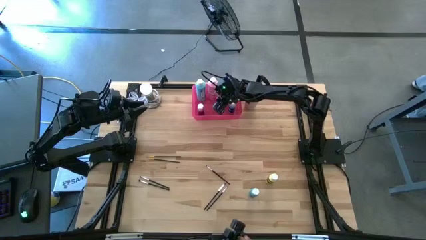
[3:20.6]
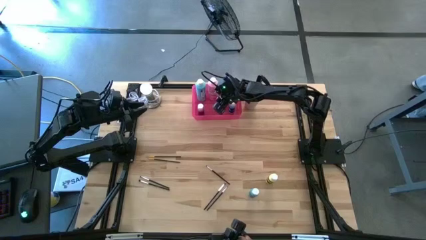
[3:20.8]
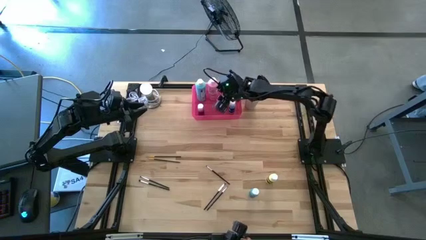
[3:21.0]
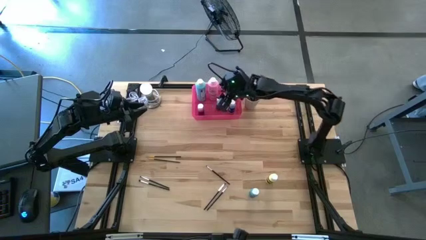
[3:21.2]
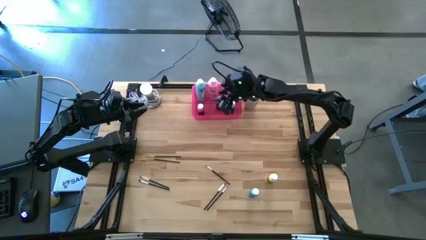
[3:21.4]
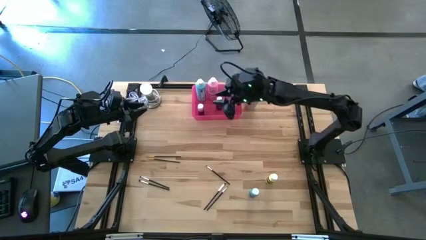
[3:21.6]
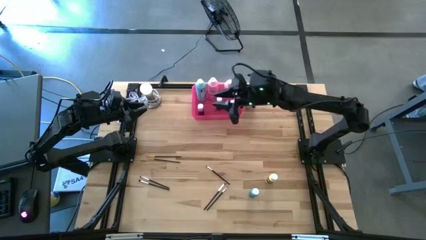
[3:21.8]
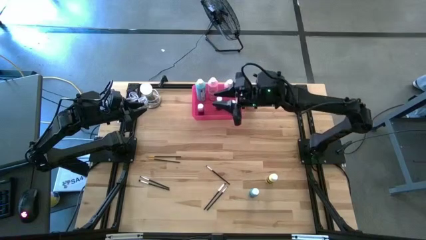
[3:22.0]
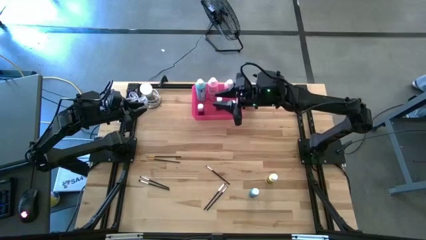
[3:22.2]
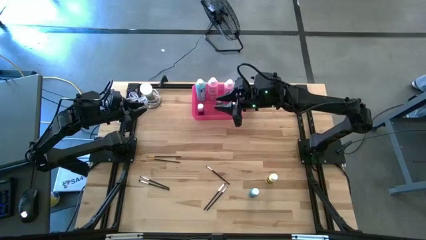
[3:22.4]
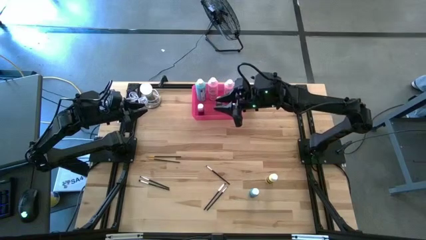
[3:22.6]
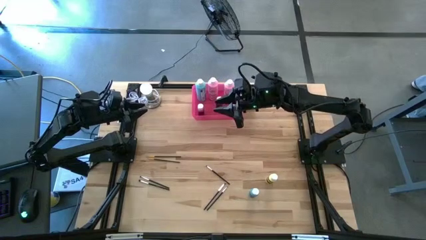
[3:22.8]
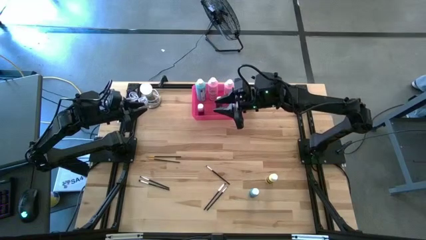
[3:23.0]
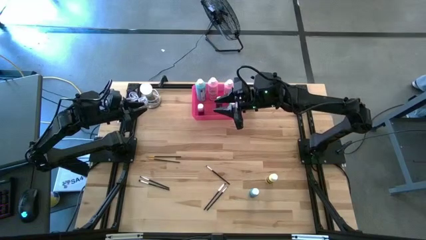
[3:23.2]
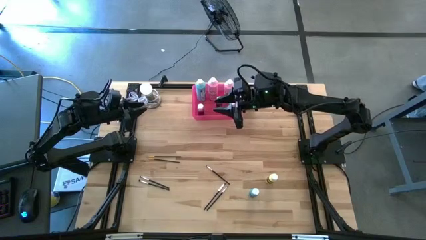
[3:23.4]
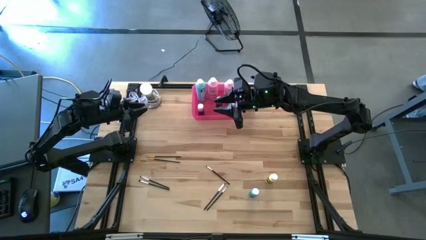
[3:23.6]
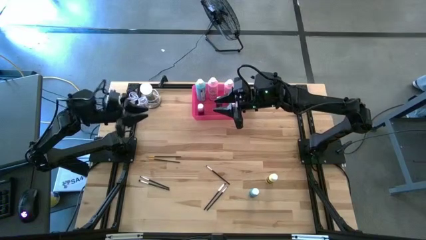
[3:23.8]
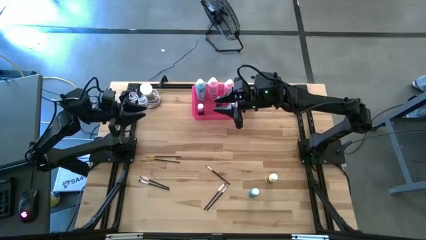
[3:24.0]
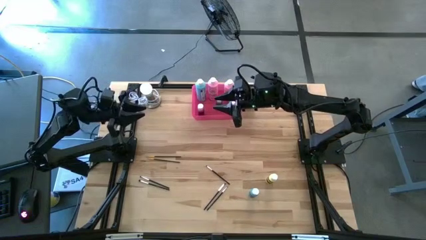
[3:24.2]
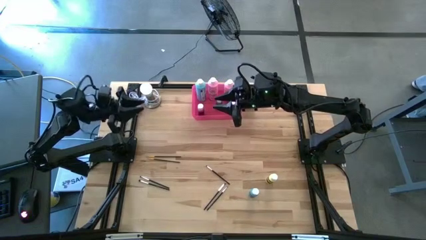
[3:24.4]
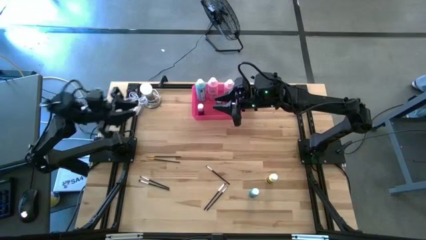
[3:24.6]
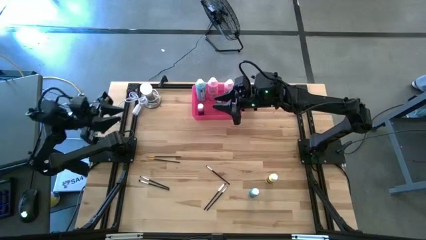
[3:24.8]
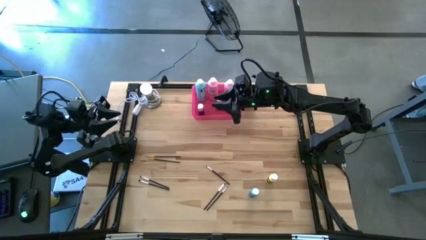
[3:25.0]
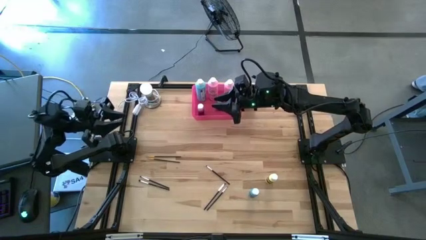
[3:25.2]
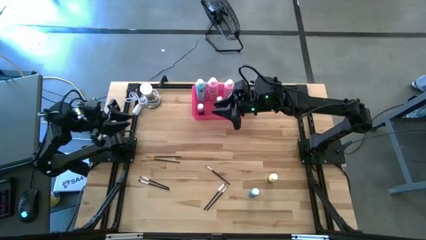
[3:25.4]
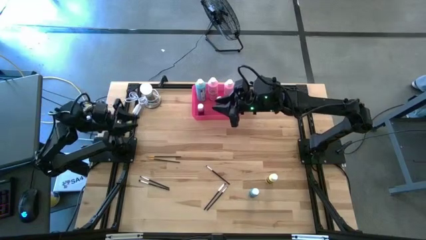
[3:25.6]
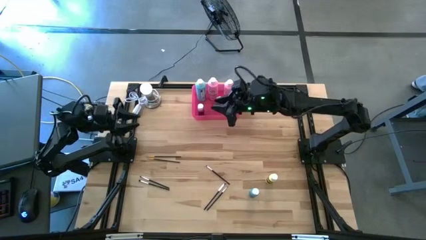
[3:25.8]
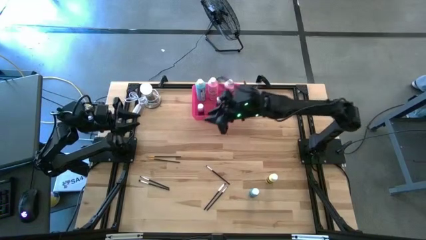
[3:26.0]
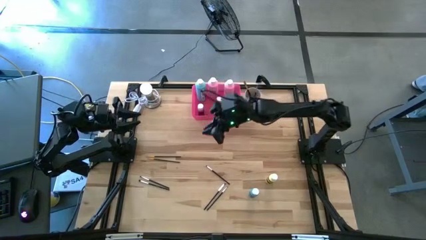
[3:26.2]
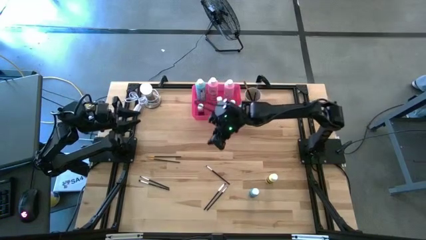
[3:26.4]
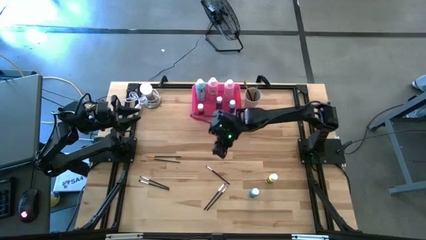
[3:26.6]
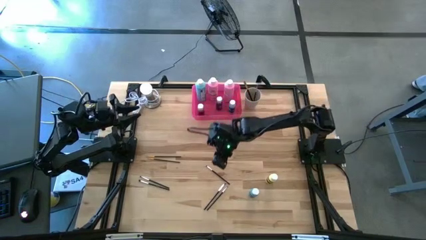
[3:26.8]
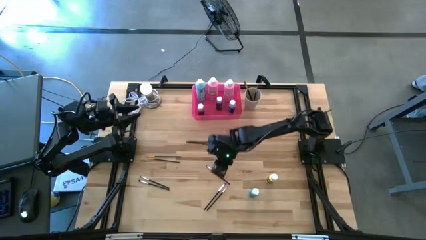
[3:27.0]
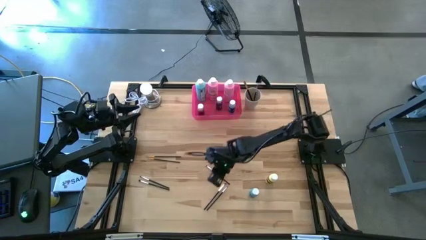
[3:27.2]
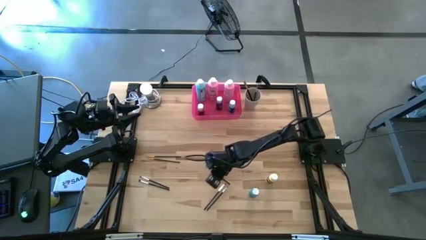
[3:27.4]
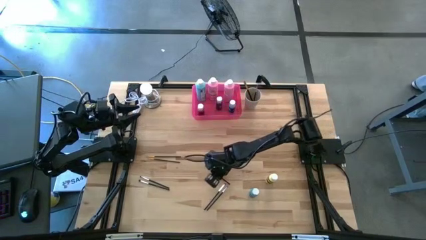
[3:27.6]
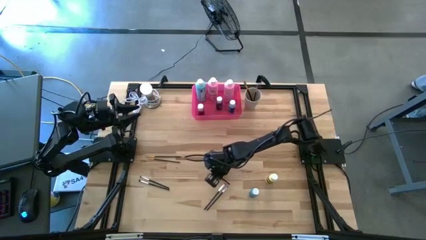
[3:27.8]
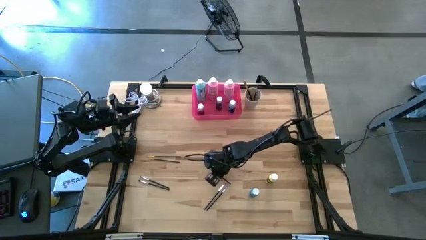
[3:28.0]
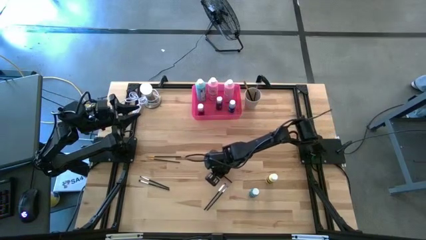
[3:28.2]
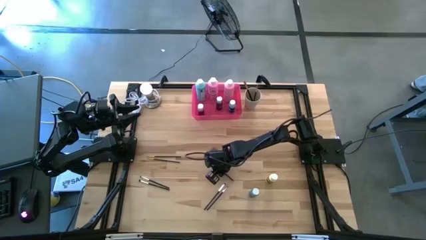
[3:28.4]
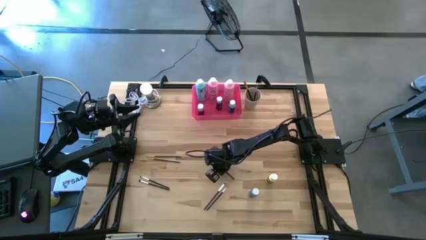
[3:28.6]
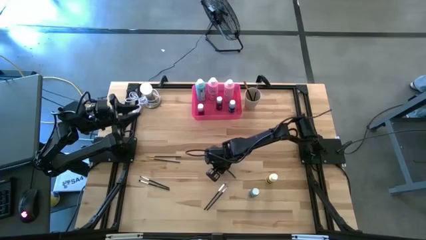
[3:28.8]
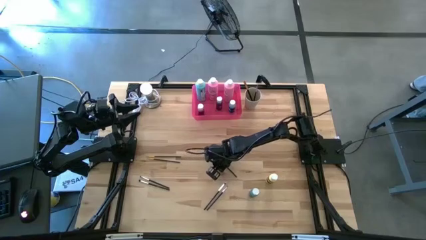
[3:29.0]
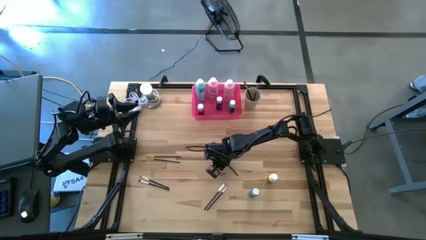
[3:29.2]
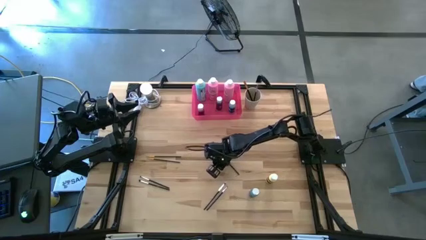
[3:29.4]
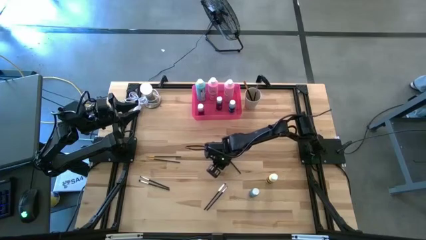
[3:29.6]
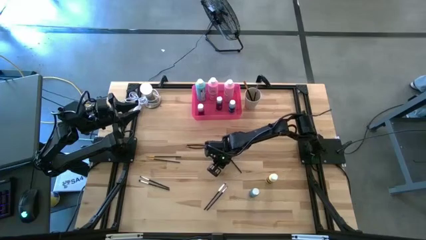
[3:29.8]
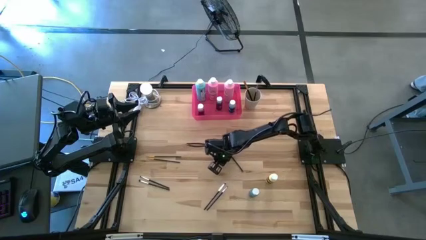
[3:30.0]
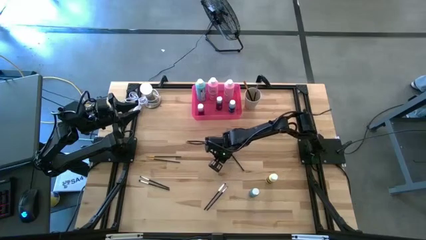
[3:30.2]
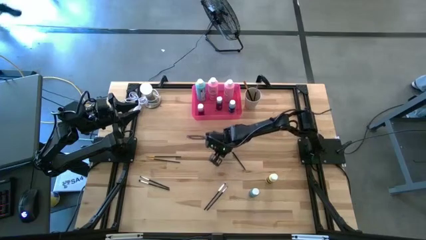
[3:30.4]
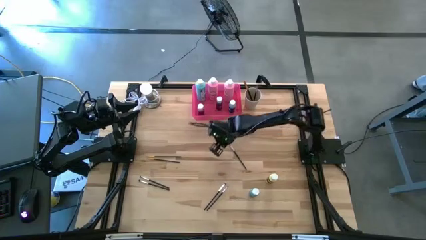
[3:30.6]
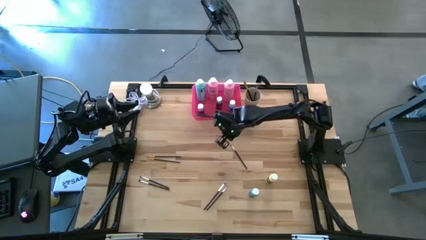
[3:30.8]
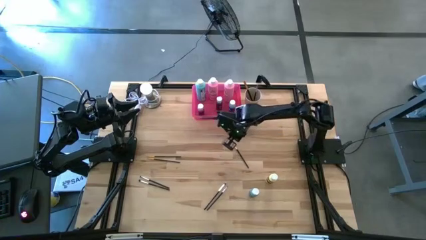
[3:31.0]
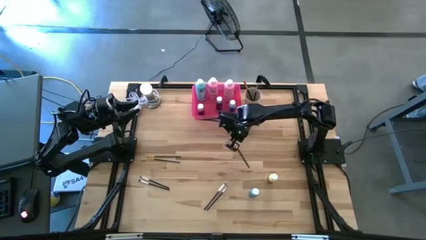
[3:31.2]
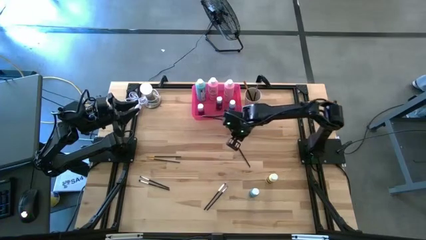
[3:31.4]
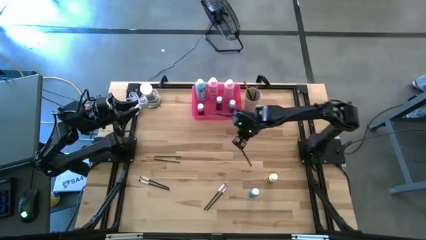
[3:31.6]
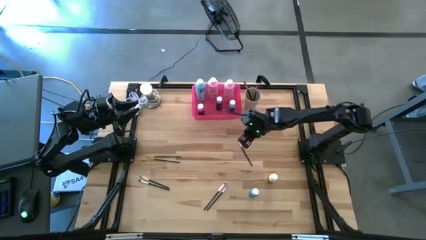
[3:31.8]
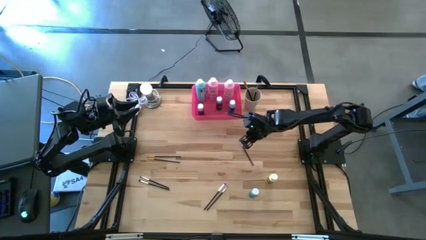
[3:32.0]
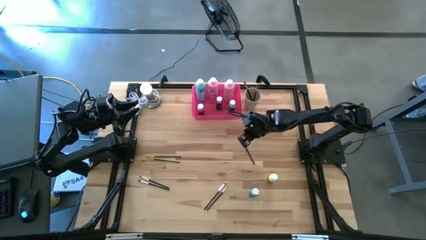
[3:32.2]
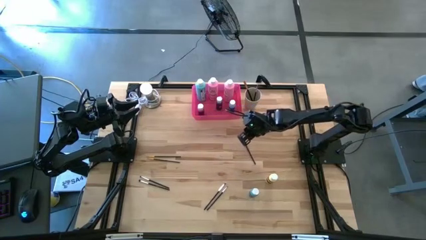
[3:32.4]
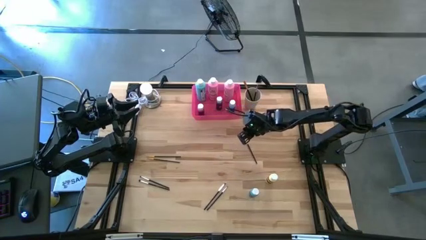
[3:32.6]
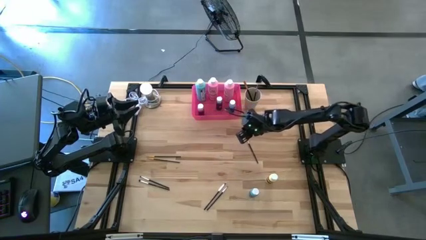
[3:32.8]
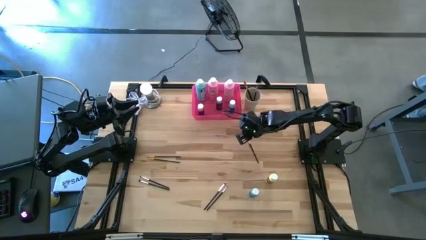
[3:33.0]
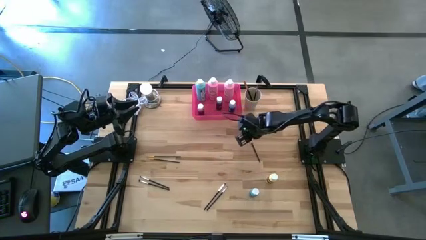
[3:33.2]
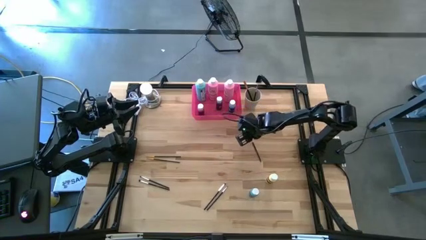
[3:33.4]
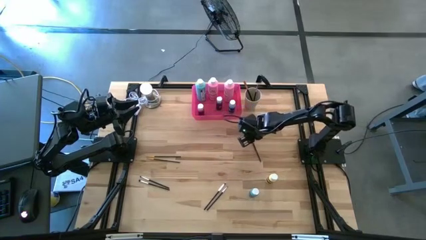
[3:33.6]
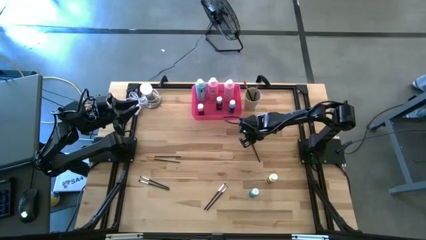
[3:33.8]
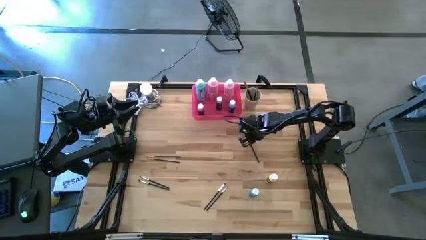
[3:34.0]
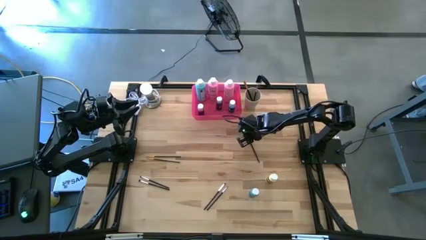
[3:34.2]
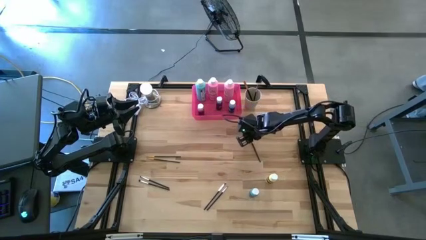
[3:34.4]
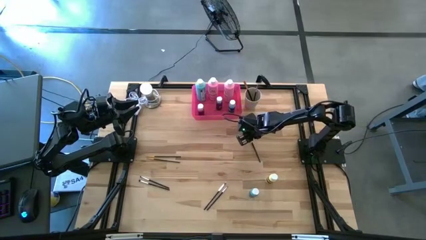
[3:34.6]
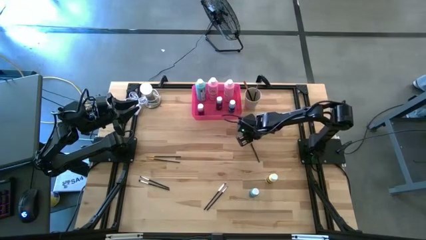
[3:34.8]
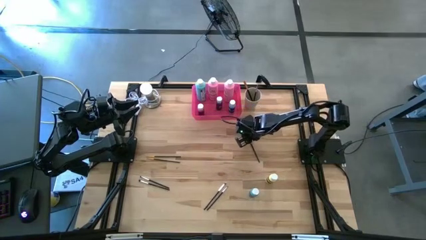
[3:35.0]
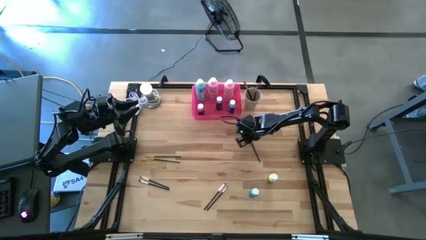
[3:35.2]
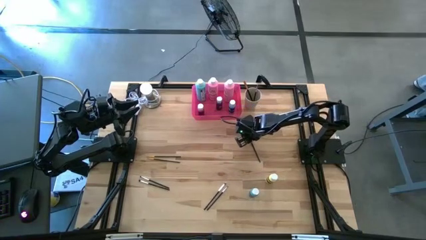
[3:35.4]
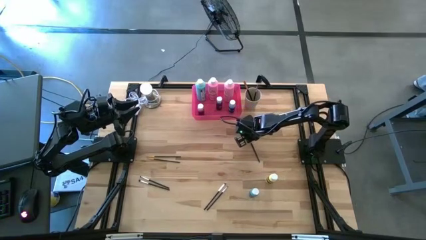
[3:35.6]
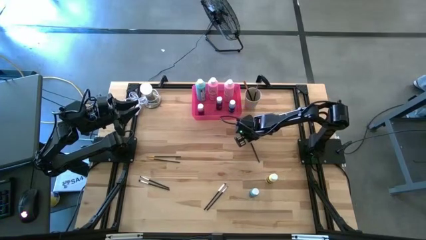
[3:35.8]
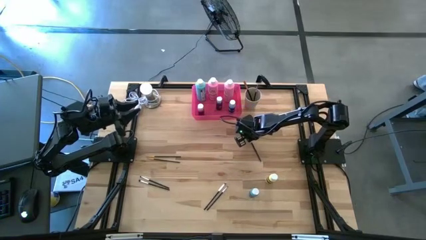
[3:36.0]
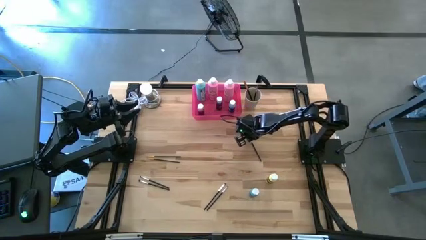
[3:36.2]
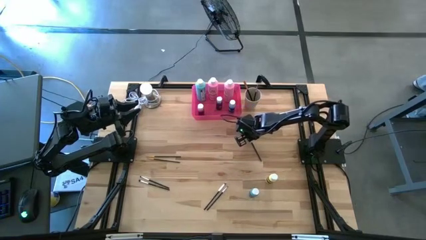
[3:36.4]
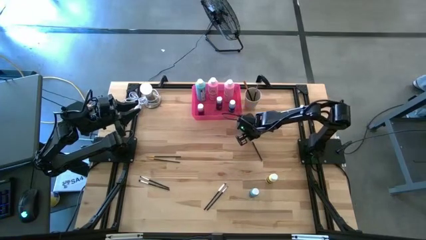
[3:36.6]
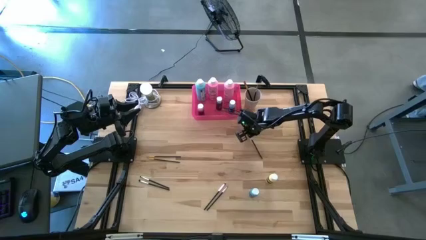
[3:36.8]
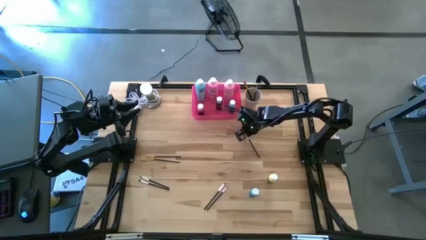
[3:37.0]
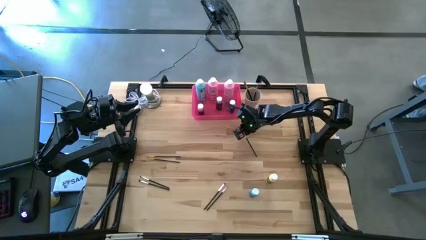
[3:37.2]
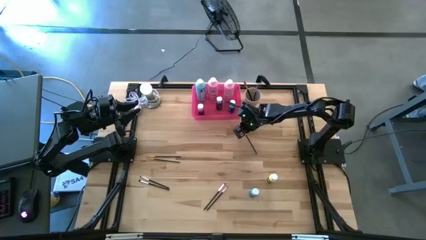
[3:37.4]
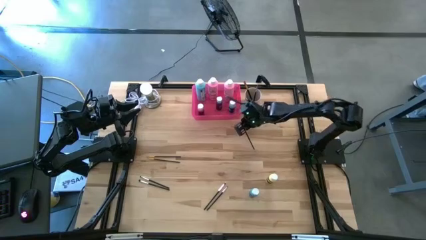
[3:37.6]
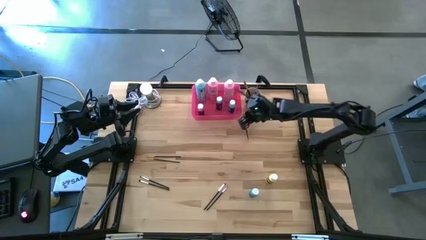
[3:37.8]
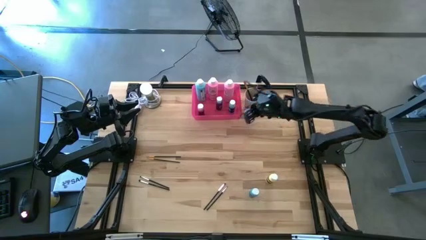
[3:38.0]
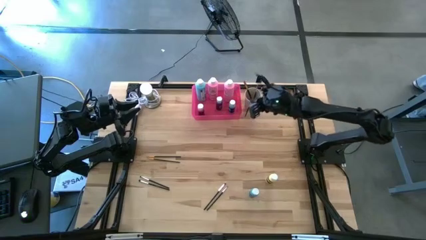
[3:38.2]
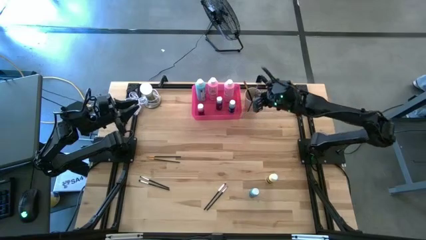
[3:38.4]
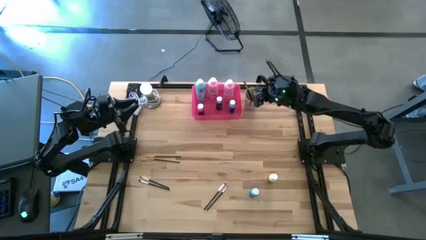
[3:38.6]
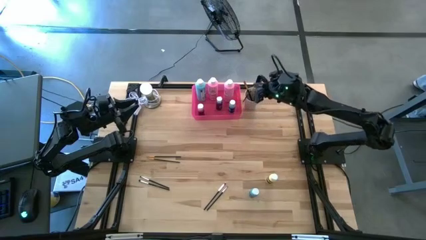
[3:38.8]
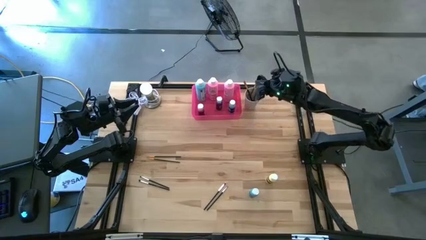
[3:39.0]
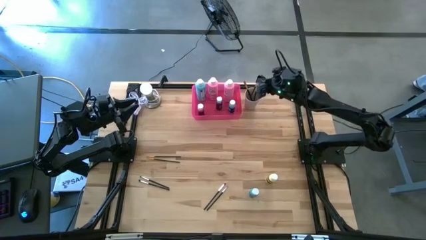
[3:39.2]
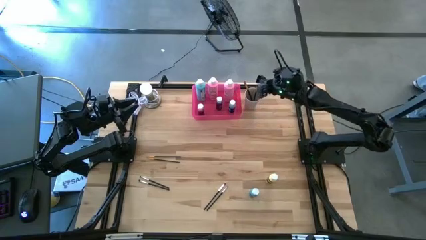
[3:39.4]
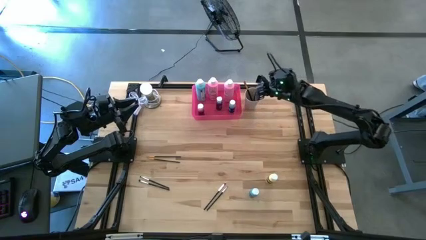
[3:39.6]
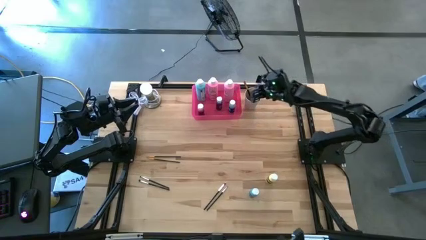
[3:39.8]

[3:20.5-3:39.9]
Task: Pick & Place Paint Supplies
Put the silver paintbrush into the white cup
